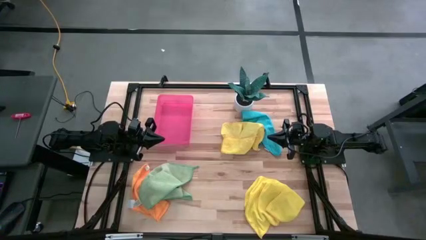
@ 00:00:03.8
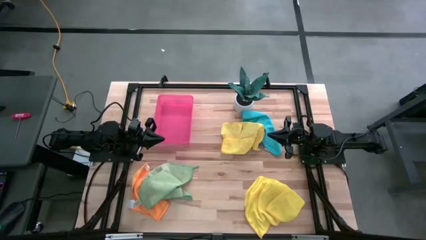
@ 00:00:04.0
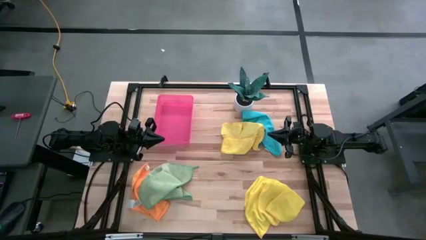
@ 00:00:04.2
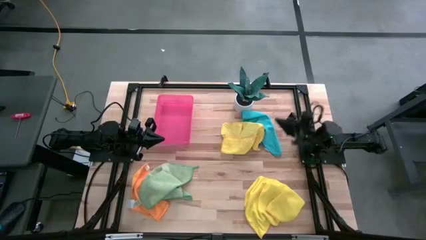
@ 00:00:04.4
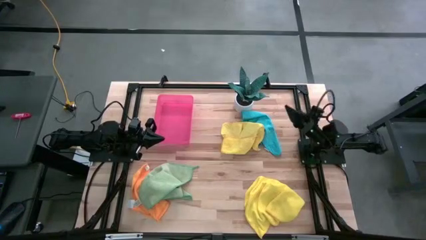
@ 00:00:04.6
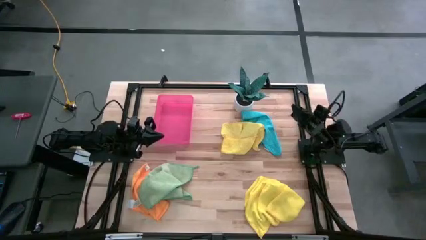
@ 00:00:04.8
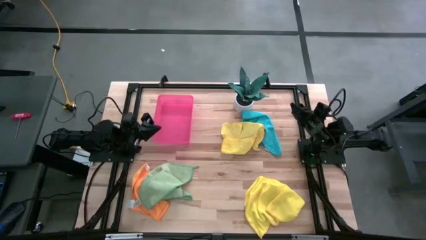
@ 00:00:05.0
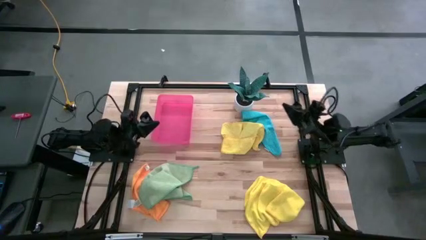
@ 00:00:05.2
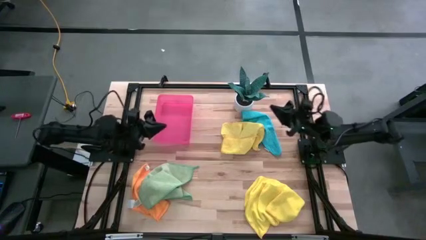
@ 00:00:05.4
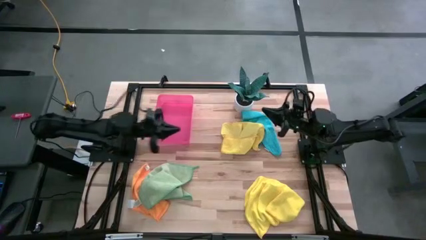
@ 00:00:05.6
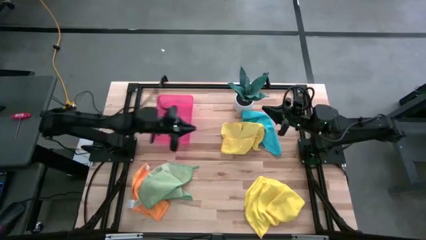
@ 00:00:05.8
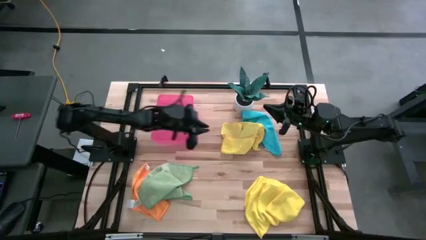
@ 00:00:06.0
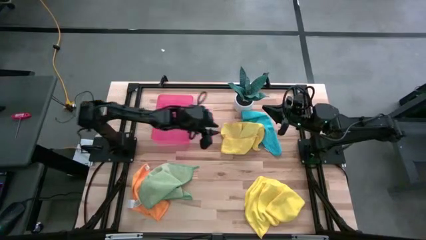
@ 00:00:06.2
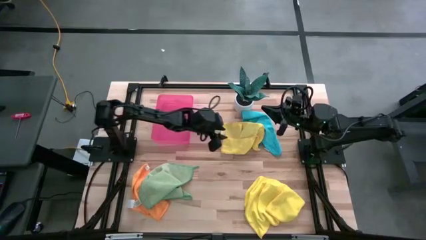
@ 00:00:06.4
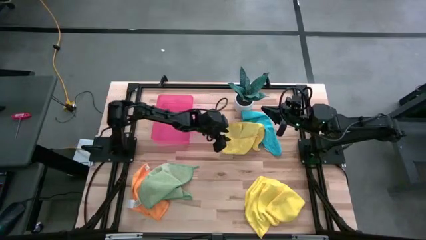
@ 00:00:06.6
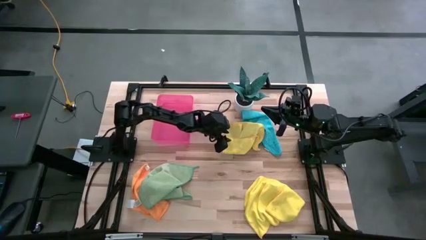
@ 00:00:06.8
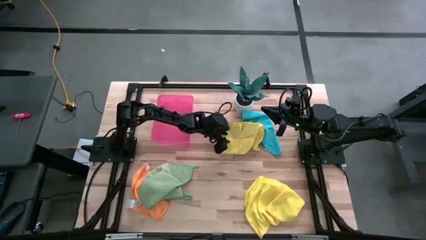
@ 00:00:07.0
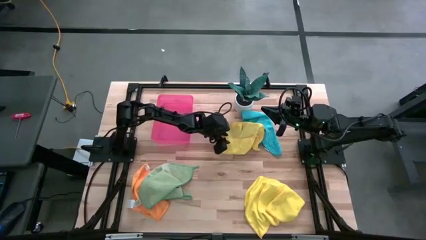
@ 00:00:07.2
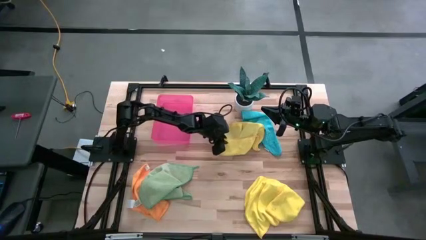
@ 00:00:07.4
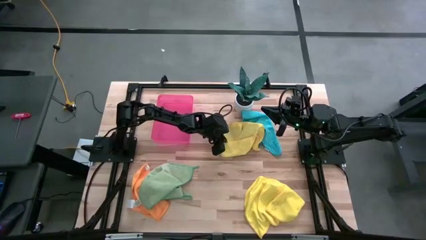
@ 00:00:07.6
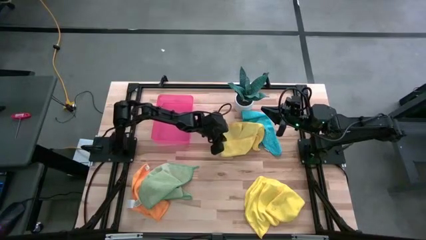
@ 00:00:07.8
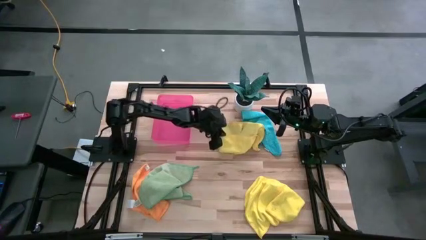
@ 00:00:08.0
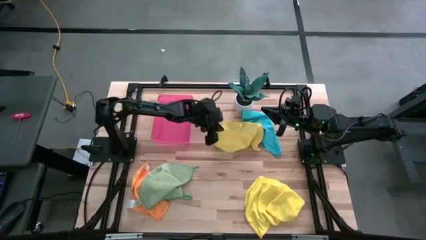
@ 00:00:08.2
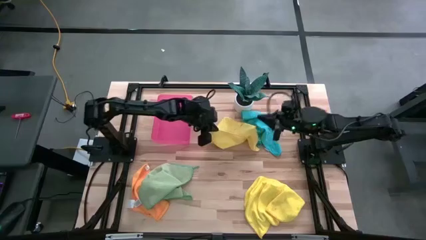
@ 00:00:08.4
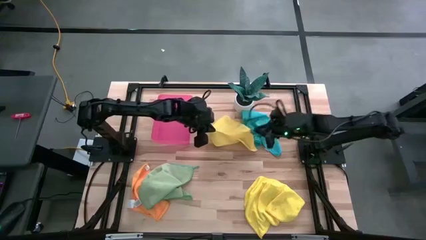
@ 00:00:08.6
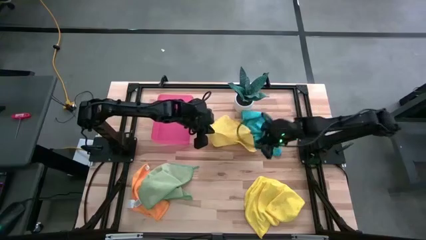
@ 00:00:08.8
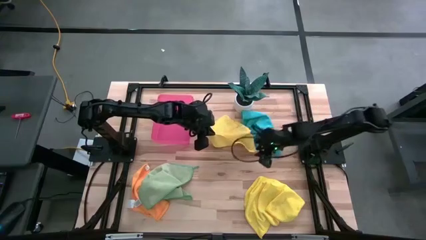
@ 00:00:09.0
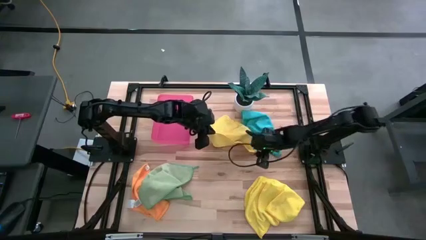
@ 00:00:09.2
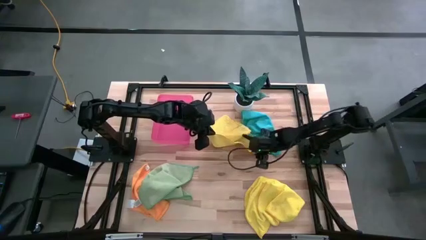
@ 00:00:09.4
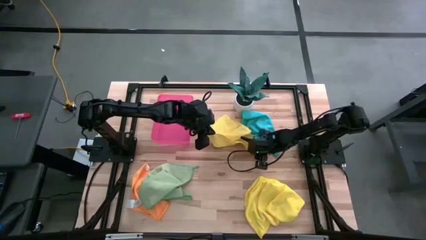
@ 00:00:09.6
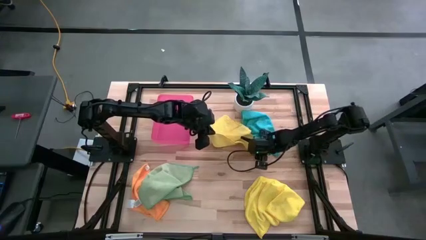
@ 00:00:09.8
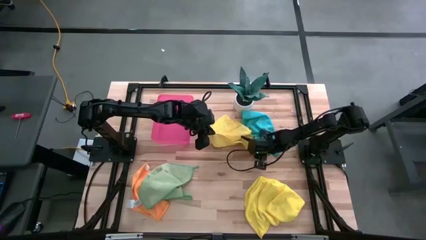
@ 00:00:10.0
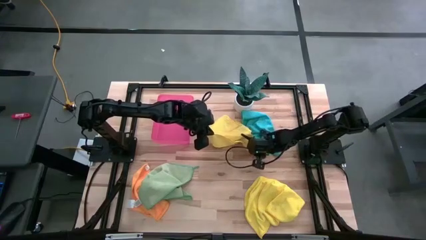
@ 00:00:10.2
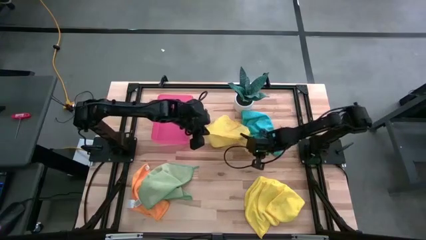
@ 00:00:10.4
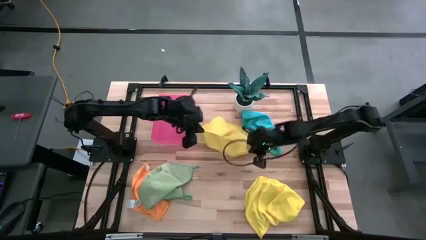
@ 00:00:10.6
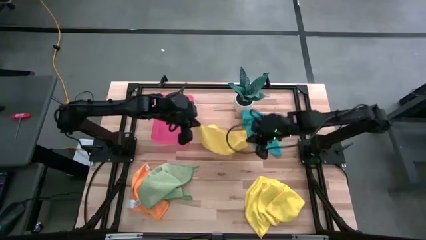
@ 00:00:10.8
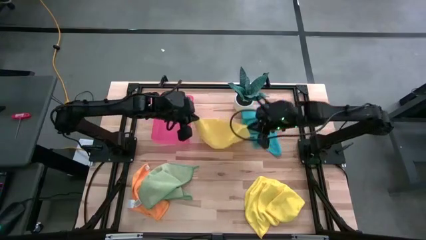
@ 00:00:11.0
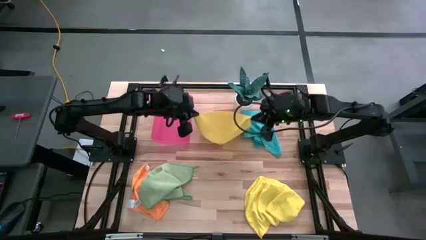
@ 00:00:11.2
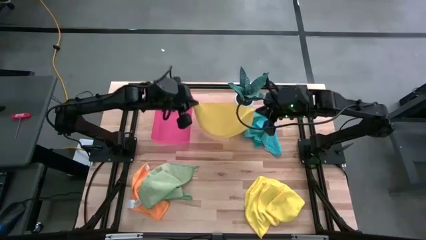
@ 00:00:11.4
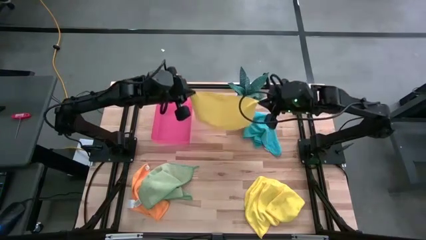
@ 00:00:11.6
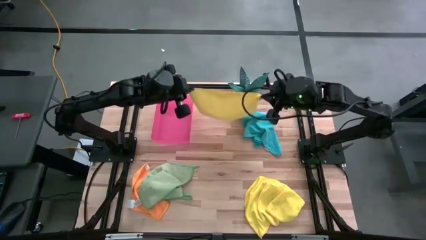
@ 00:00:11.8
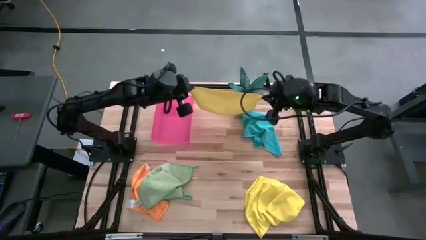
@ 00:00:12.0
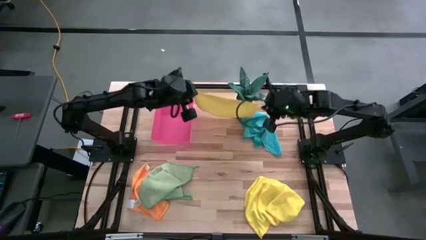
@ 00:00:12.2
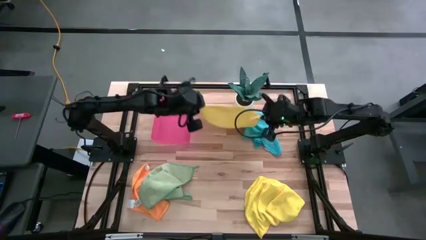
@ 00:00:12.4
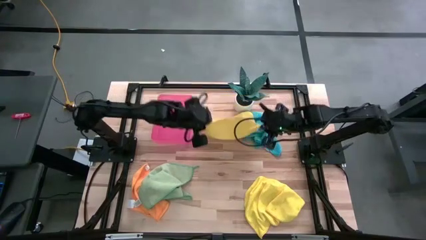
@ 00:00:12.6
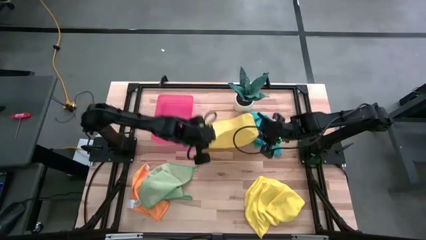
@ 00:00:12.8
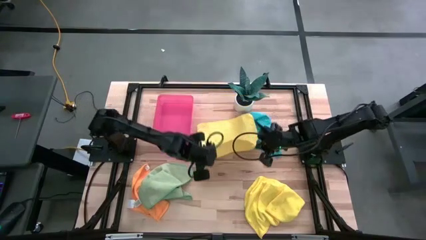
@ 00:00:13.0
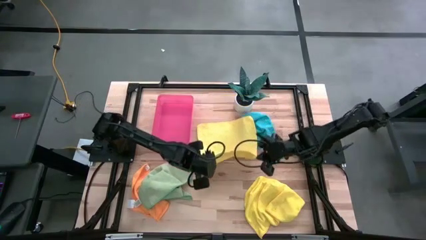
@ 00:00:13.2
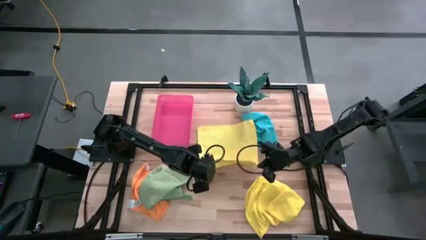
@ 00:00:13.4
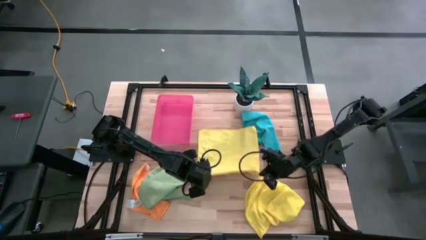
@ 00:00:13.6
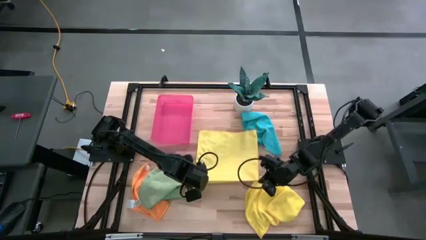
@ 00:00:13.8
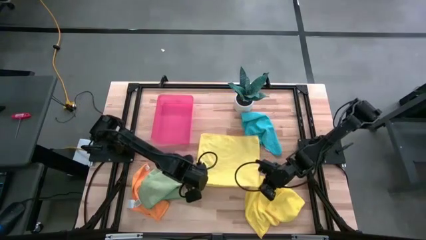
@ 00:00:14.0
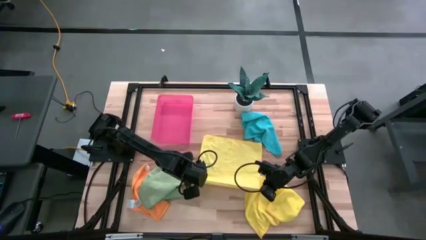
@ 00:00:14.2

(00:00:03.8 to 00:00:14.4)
Task: Fold microfiber towels
Fold the top yellow microfiber towel
